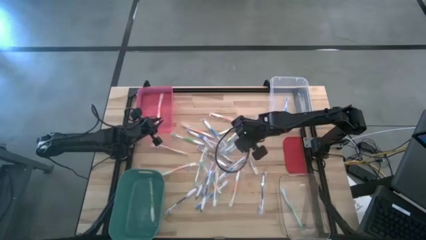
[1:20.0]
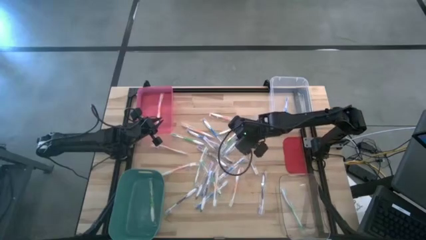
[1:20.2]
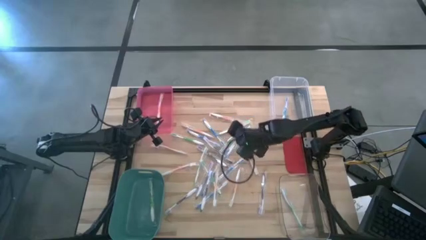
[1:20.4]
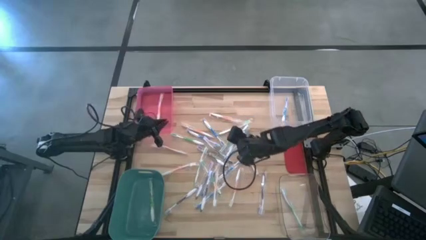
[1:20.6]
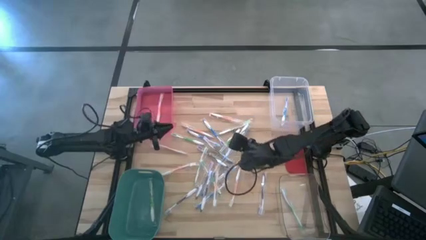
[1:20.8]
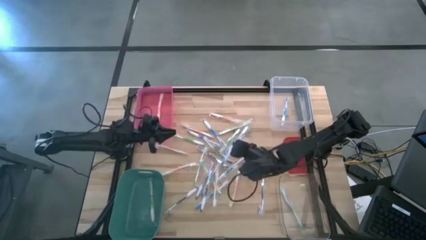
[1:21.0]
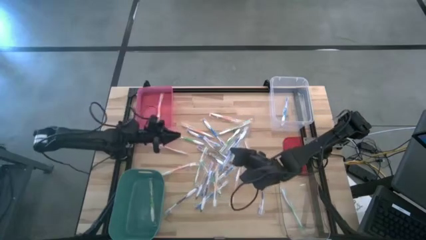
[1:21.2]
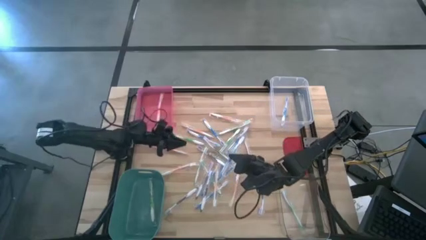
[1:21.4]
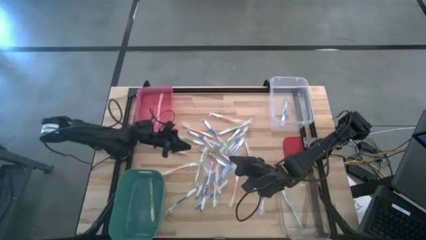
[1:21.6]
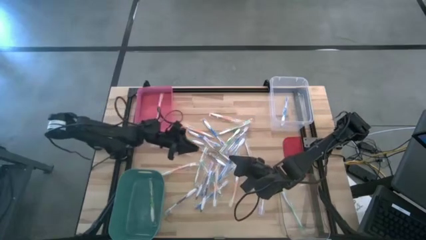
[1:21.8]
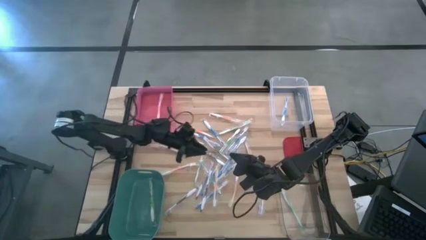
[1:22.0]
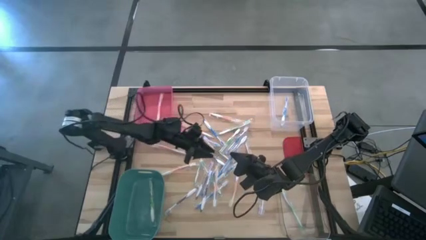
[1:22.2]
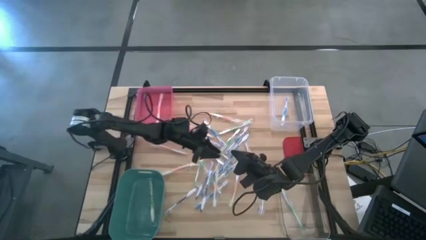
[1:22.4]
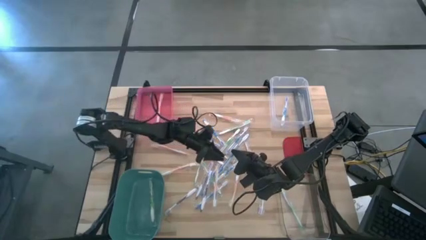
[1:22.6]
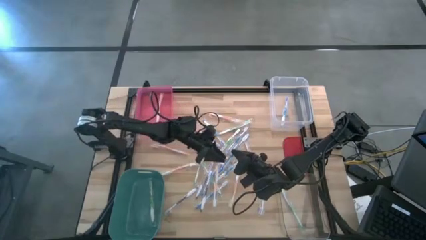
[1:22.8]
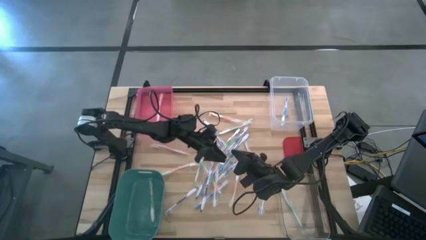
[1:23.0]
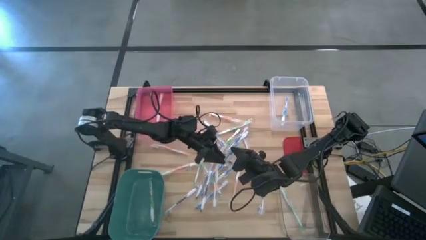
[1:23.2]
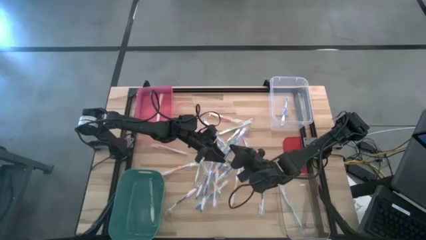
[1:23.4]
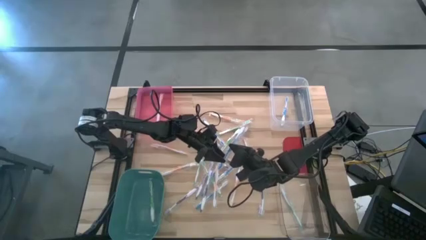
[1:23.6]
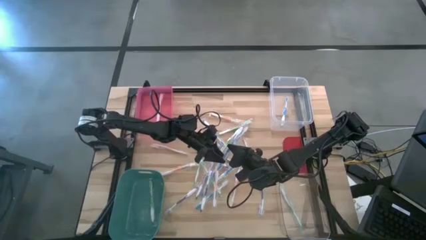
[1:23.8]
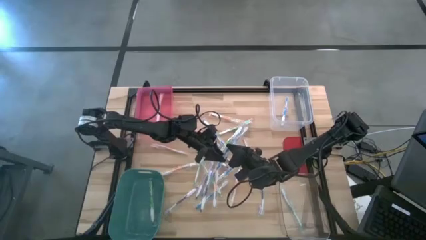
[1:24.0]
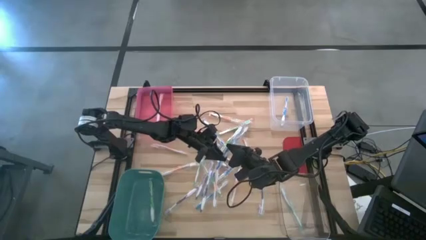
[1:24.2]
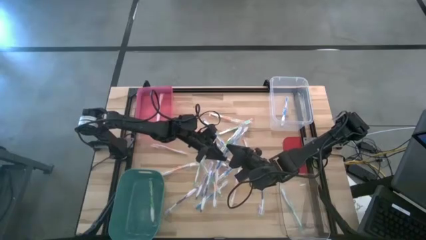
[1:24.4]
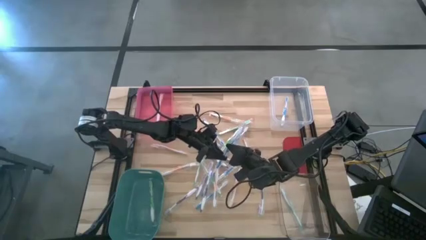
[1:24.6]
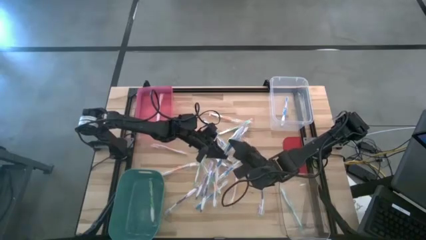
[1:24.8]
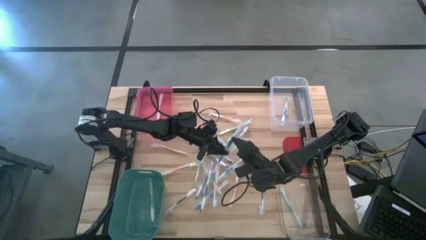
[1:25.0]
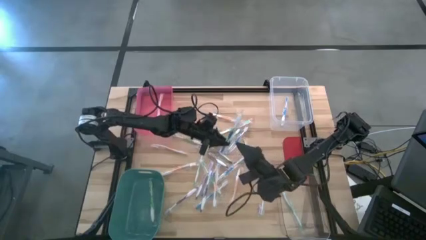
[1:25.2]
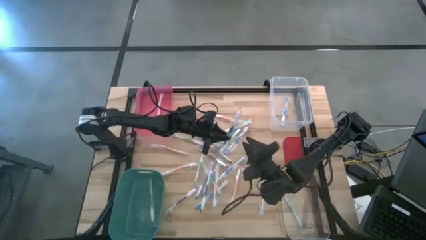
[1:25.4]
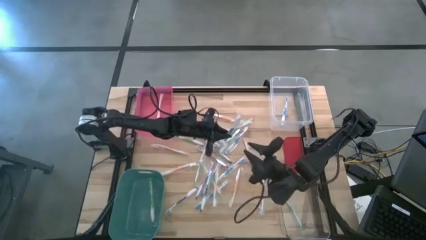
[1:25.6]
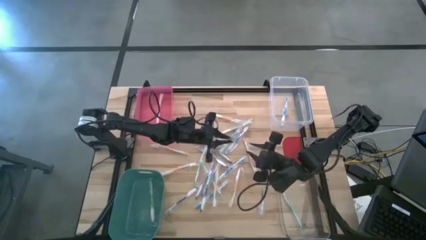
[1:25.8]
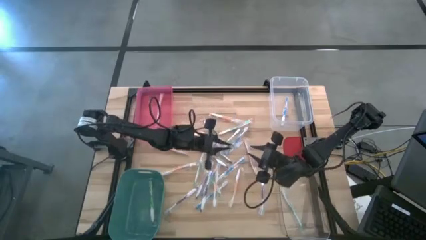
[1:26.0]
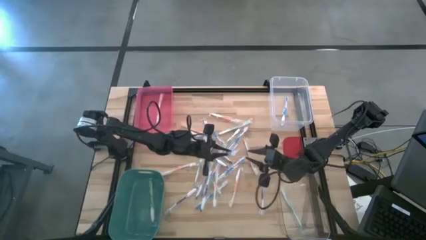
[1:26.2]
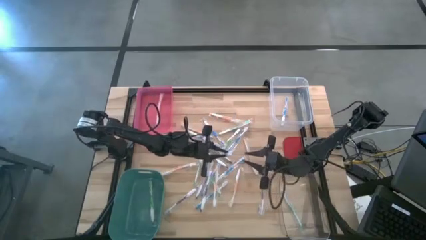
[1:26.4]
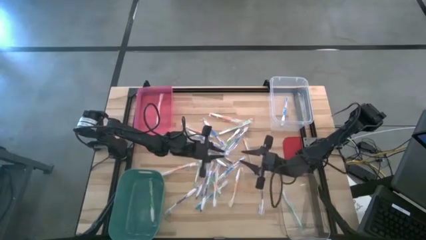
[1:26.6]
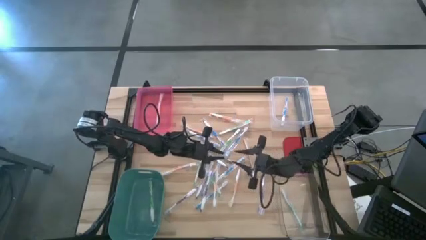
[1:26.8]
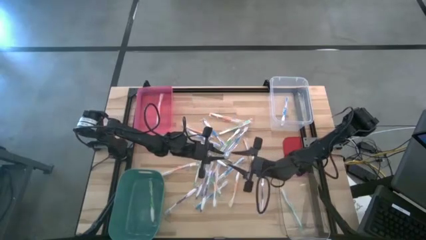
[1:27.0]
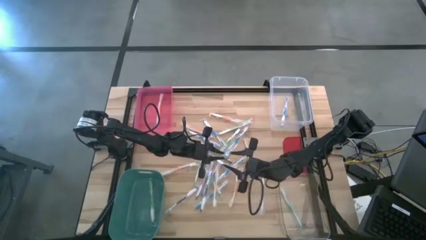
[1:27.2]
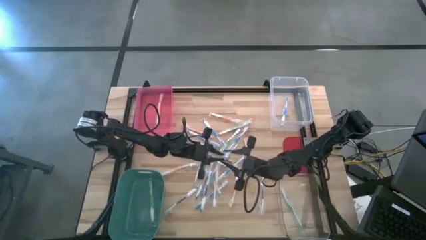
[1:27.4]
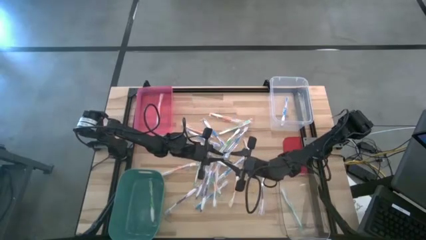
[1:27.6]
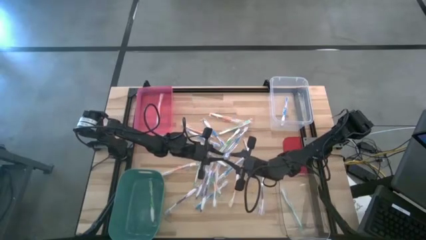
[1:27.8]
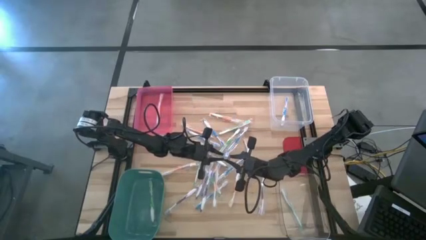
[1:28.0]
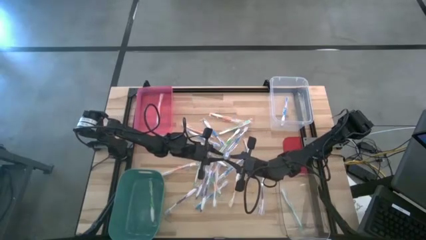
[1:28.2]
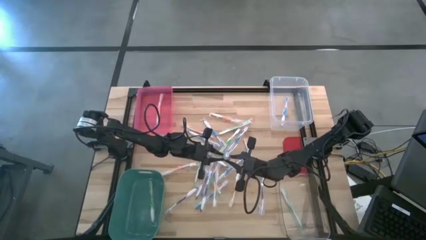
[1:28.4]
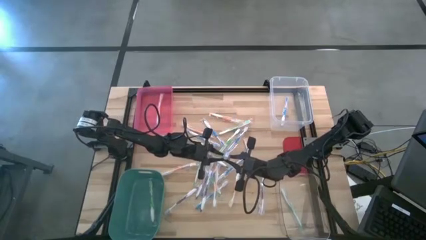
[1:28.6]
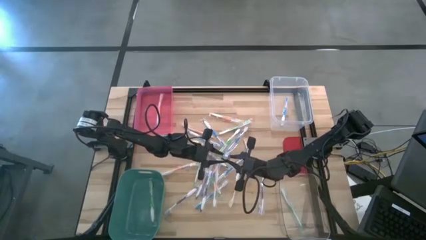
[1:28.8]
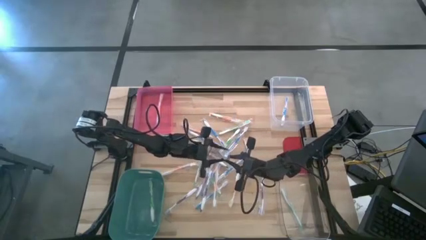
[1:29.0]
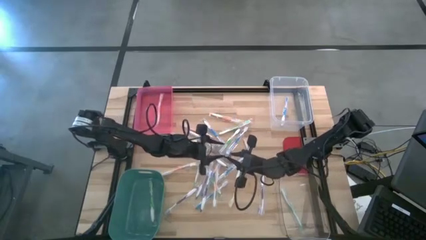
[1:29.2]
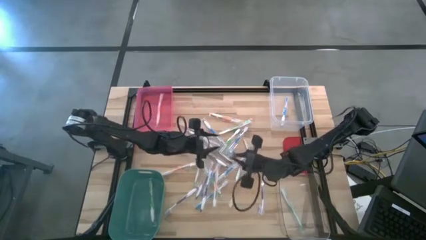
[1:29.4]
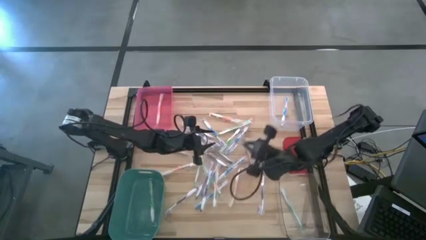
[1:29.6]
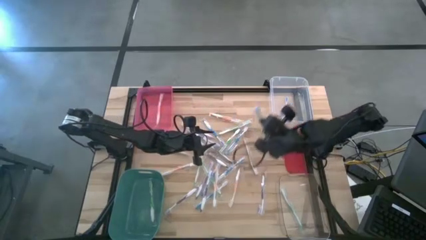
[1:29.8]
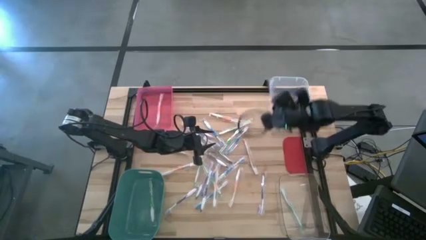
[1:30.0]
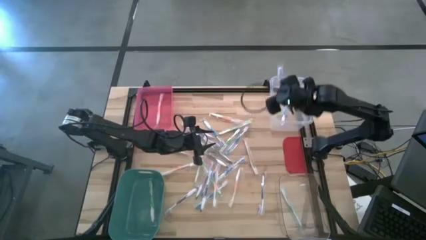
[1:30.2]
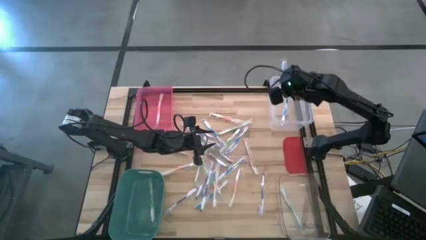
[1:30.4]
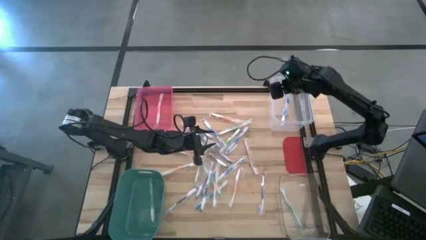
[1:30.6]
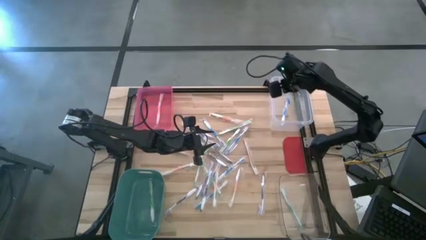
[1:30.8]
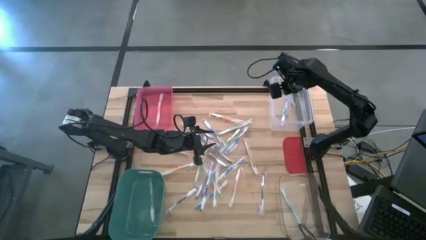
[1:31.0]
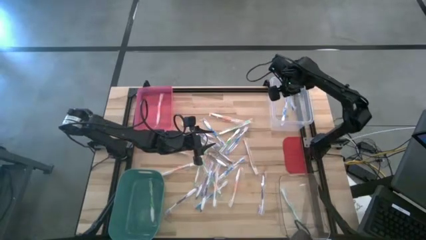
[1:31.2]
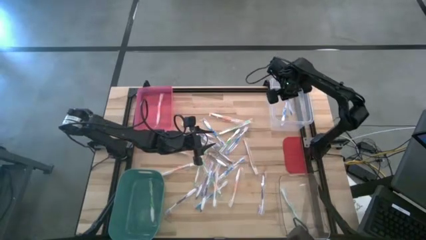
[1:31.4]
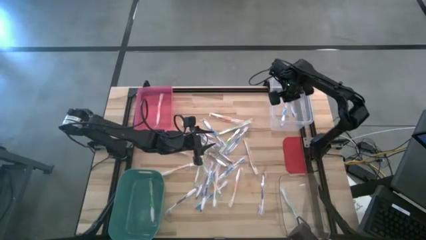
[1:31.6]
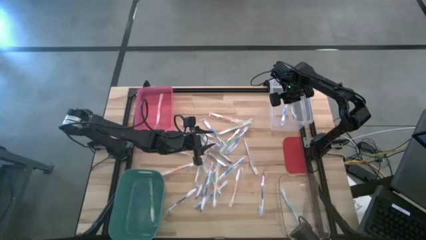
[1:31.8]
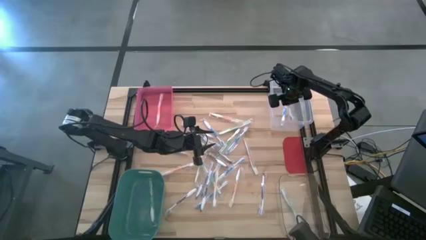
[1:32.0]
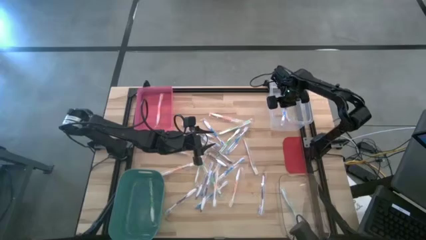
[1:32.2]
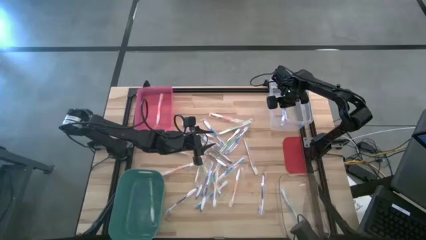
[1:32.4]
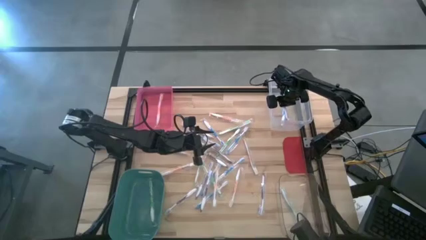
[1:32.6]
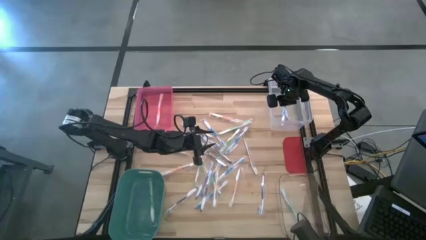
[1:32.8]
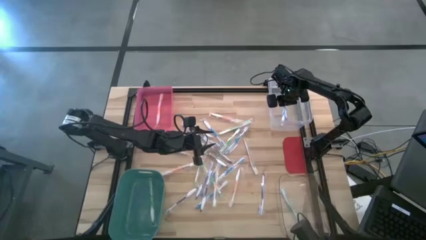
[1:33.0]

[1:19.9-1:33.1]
Task: Pick & Place Toothbrushes
Put the blue toothbrush into the top transparent bin
